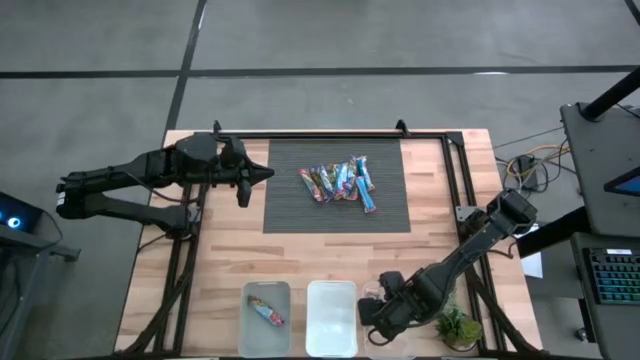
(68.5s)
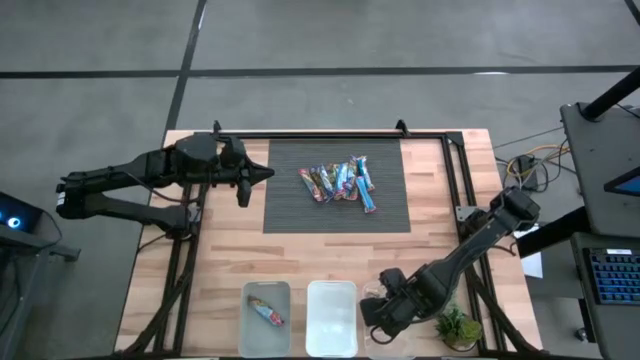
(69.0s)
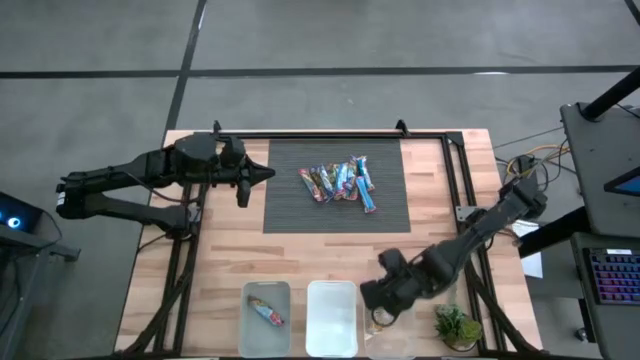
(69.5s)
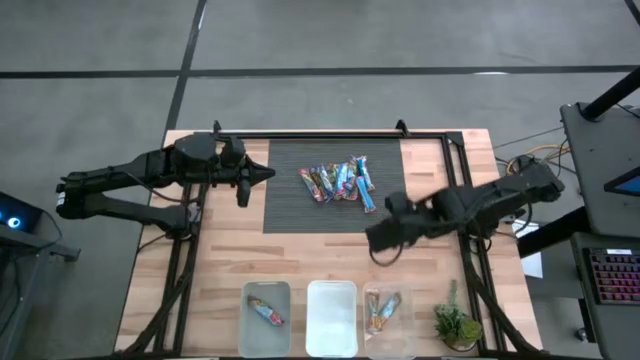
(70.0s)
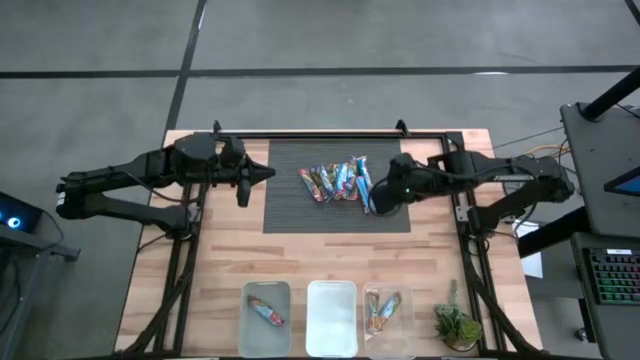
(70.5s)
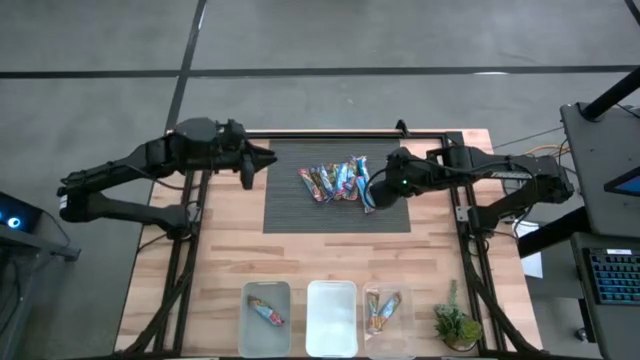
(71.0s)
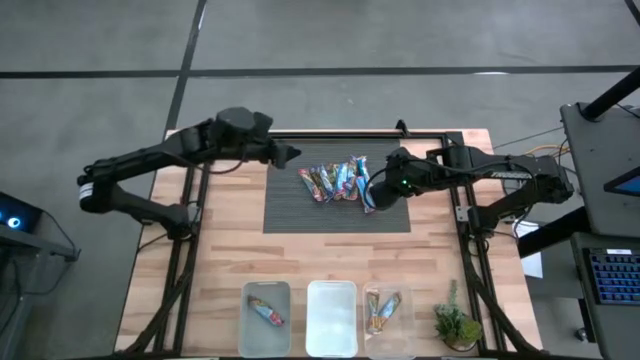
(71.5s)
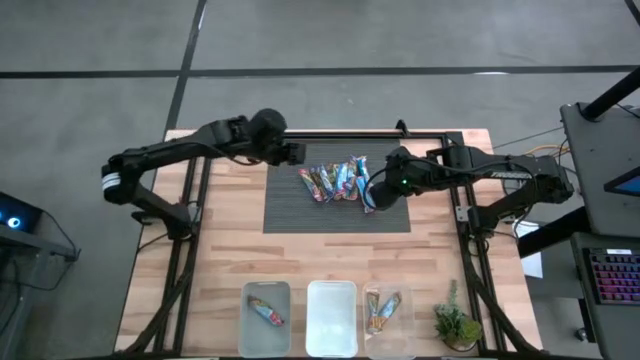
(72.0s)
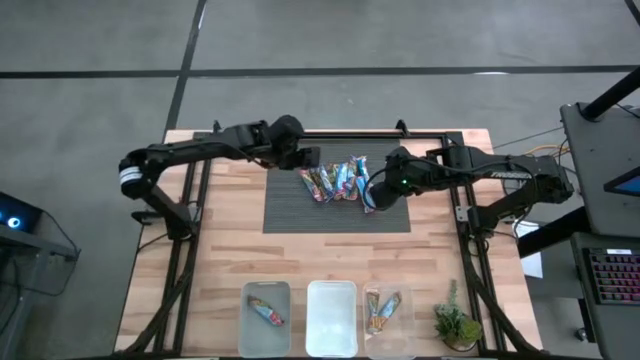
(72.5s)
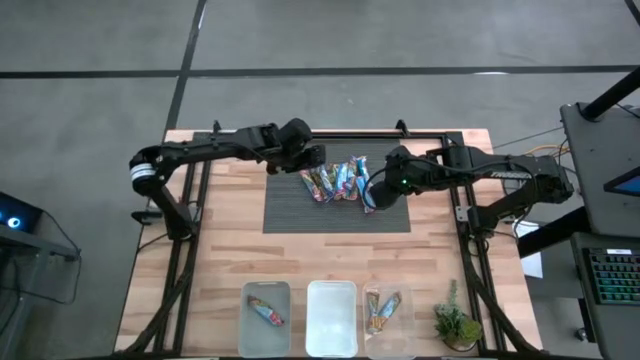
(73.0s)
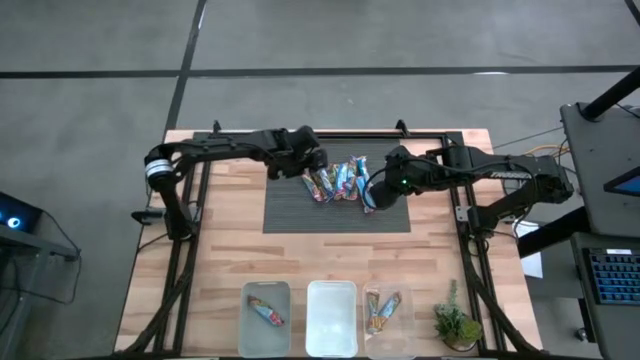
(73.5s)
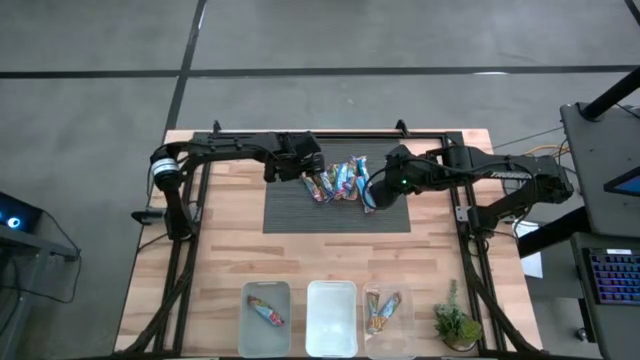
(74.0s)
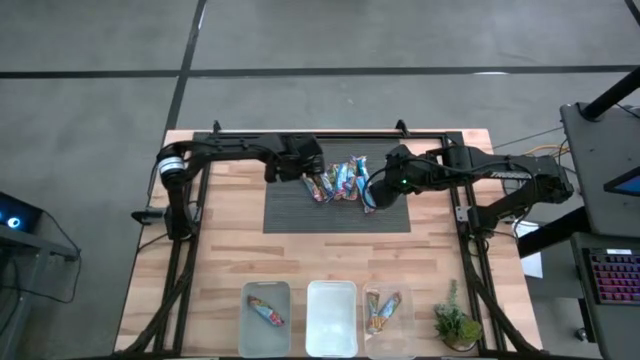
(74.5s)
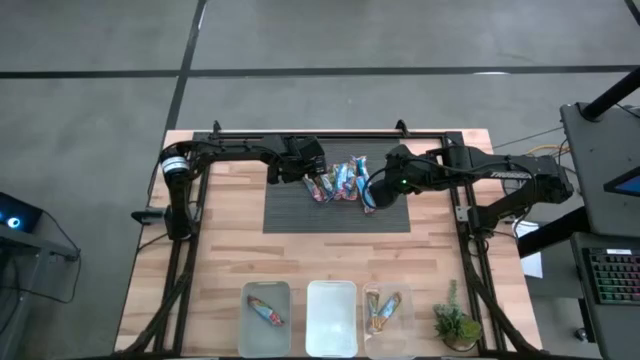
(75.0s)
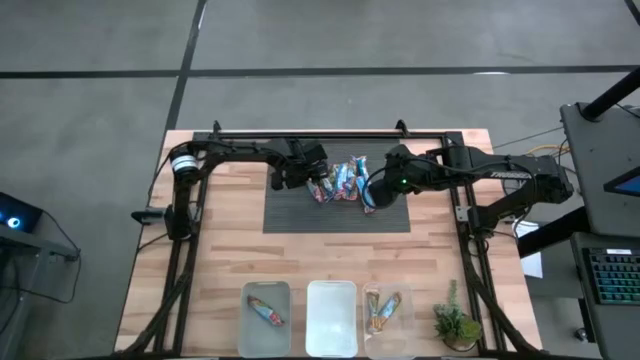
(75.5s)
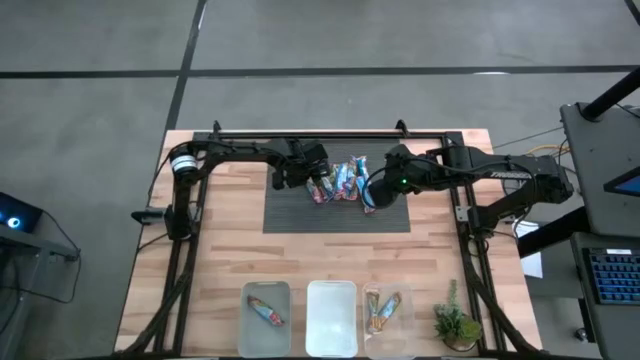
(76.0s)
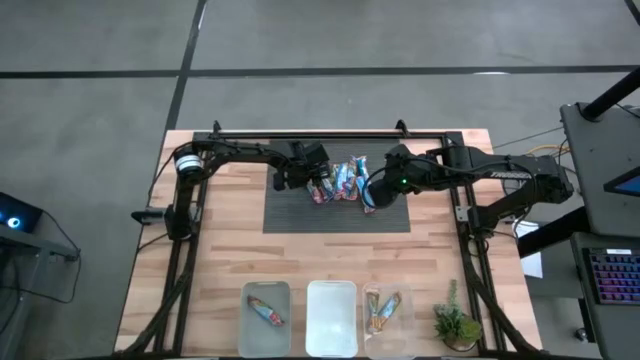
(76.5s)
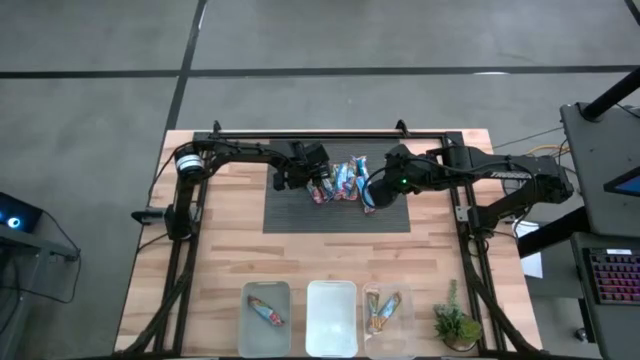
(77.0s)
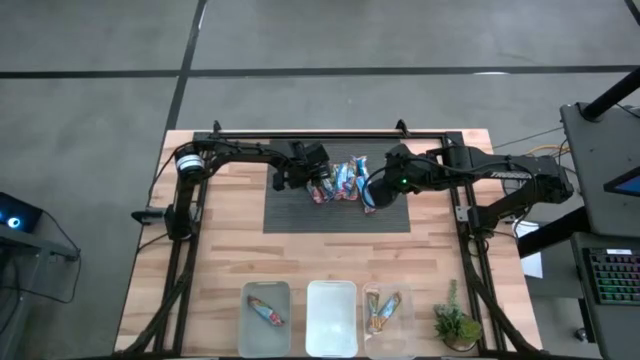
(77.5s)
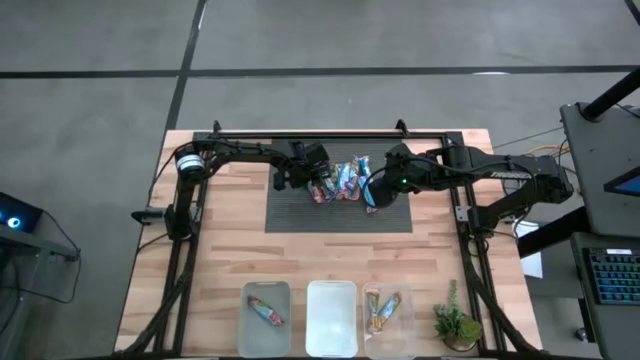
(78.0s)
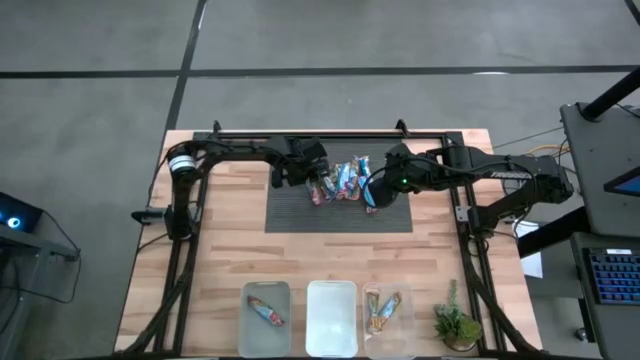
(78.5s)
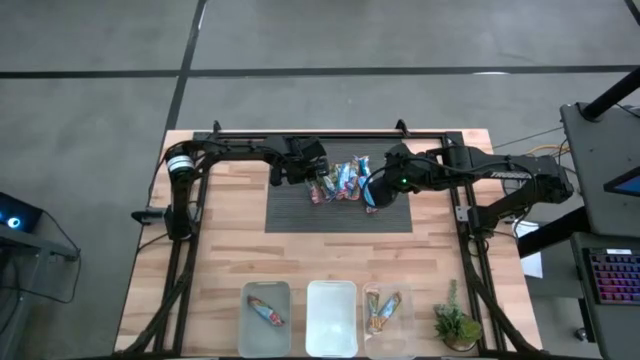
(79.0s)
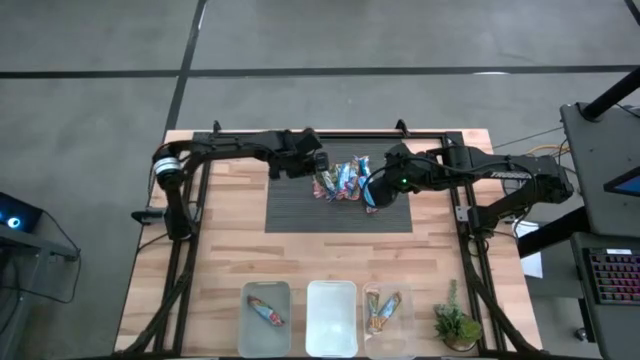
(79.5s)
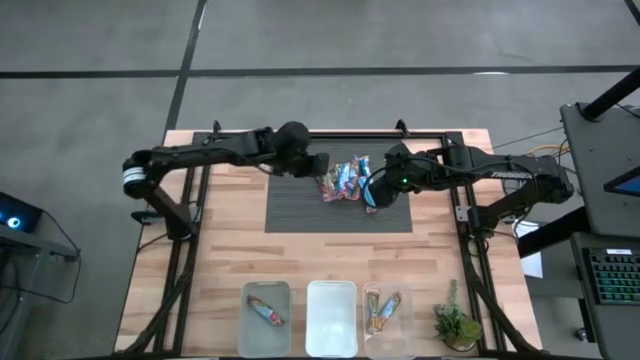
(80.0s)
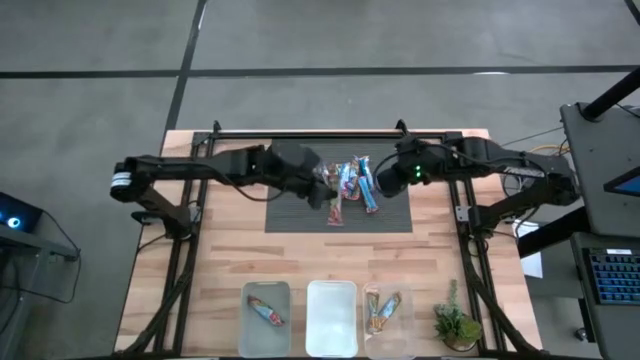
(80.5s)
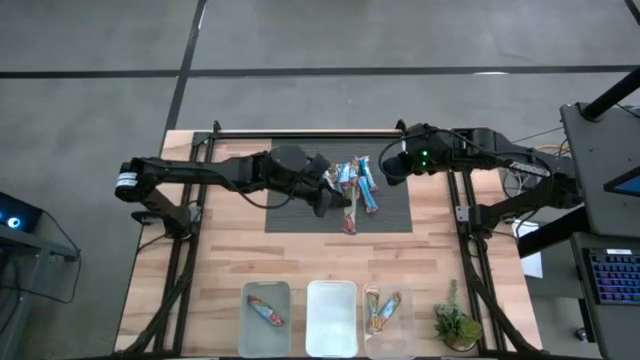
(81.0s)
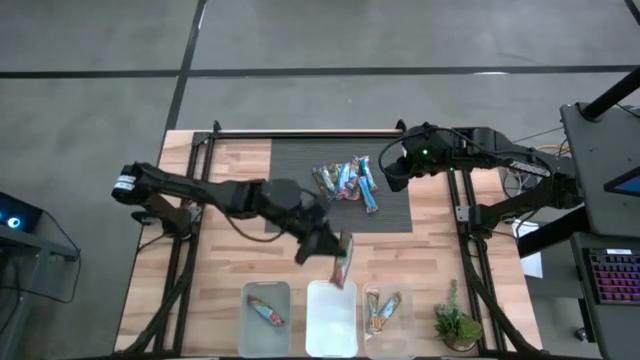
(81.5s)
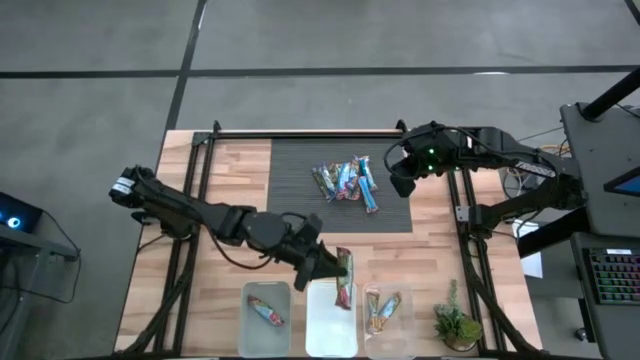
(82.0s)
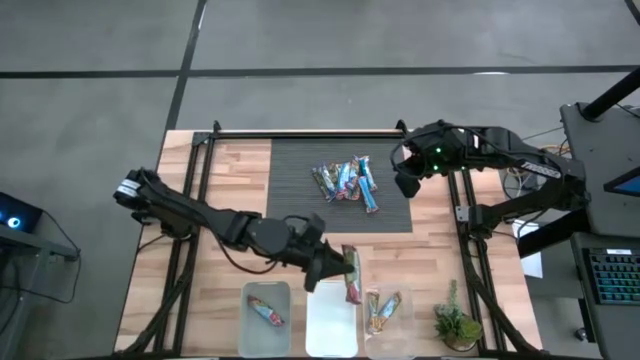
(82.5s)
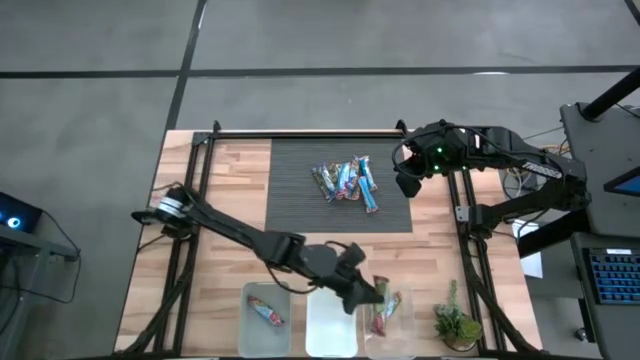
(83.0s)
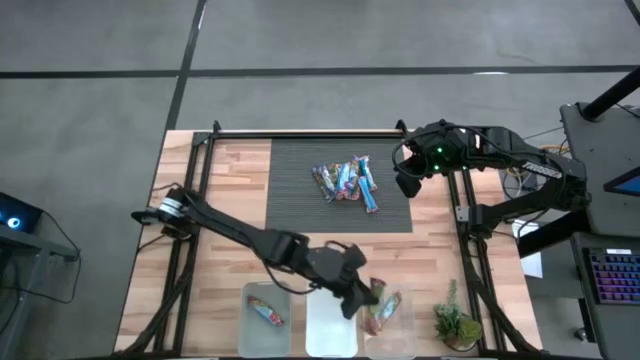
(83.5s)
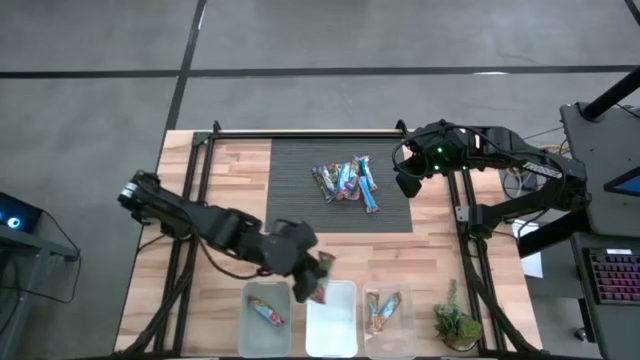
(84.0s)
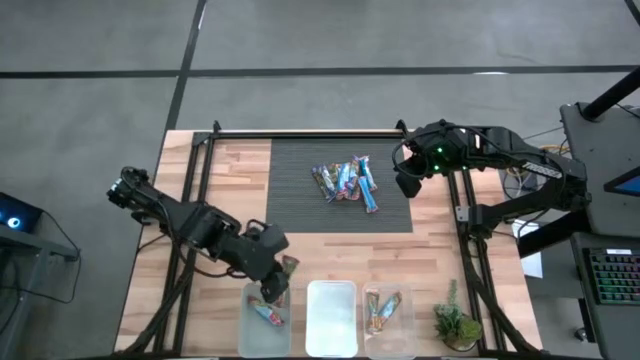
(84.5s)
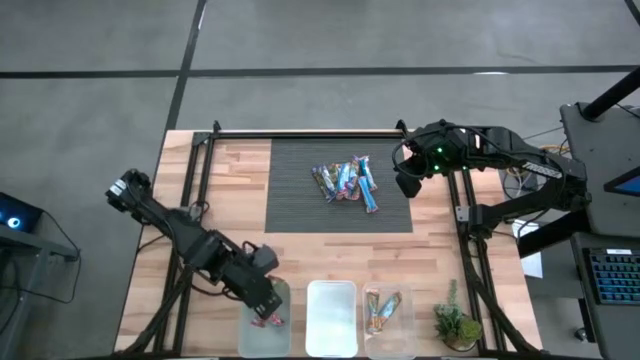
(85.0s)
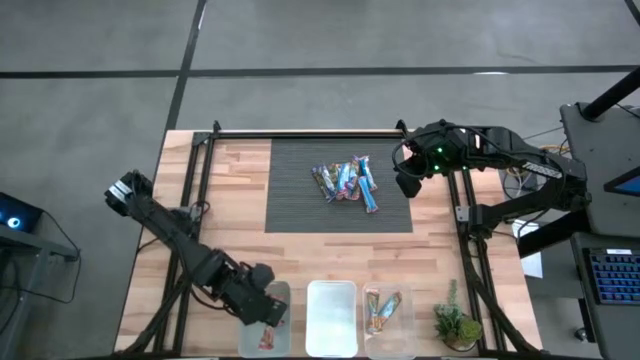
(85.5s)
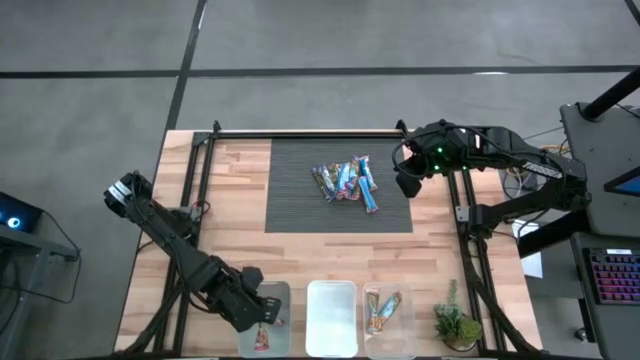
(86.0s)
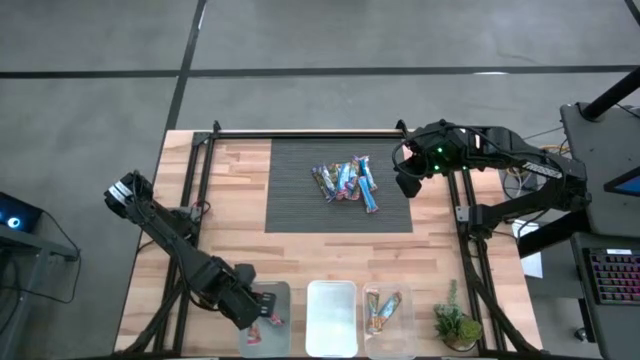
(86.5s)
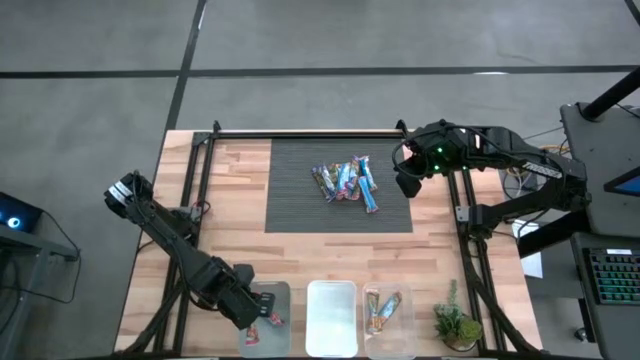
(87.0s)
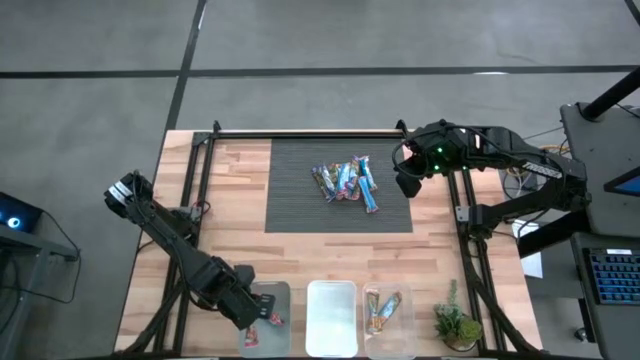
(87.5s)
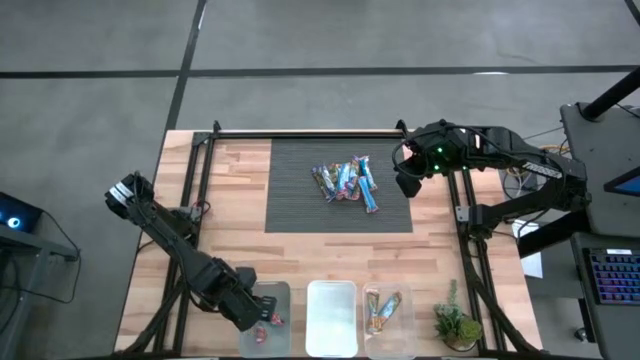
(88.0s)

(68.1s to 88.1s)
Task: Pick and place Granola Bars by type
Put the red granola bar into the gray bin

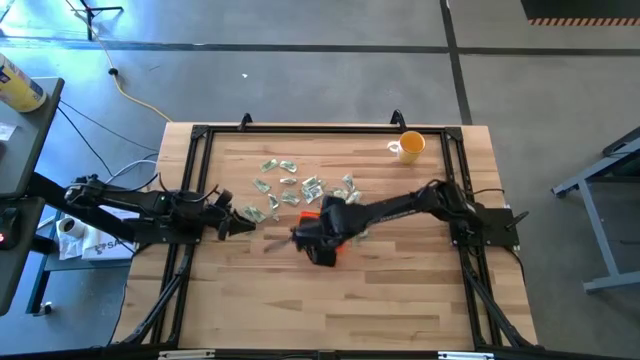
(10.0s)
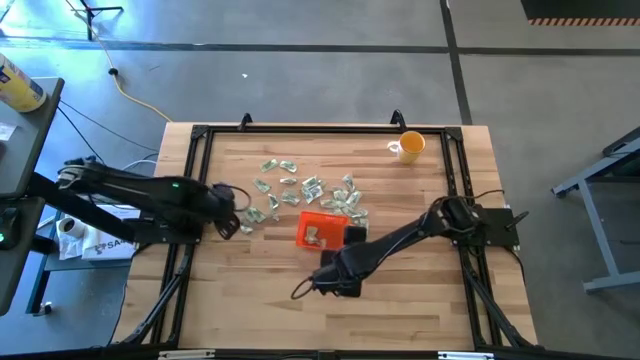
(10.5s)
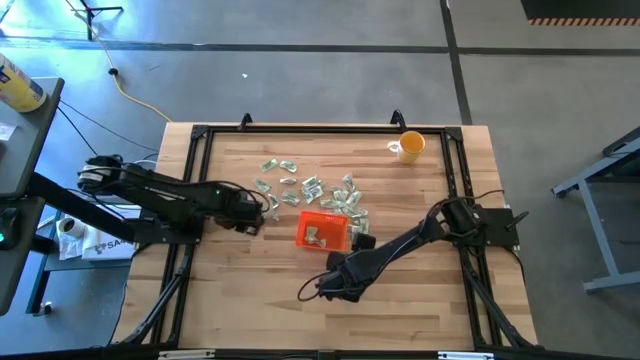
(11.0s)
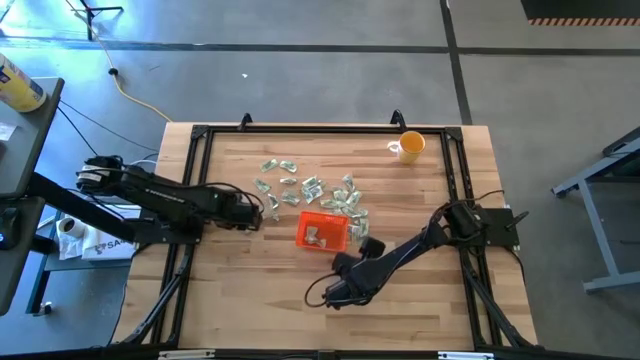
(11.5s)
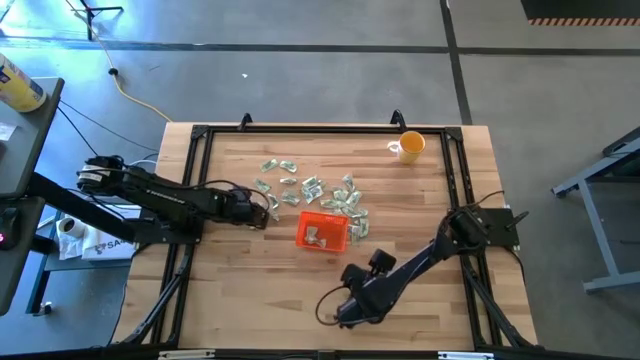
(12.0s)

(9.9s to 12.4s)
Task: Pick and place Stevia / Truvia into bins
Put the stevia packet into the orange bin

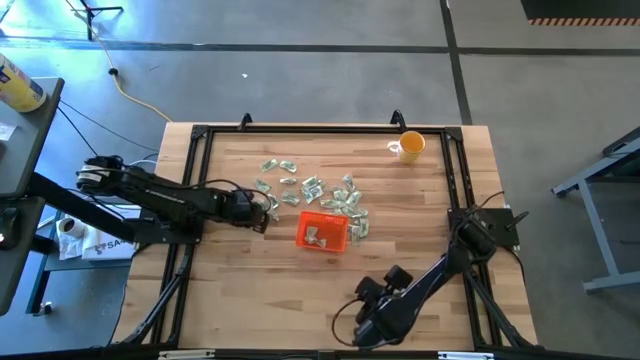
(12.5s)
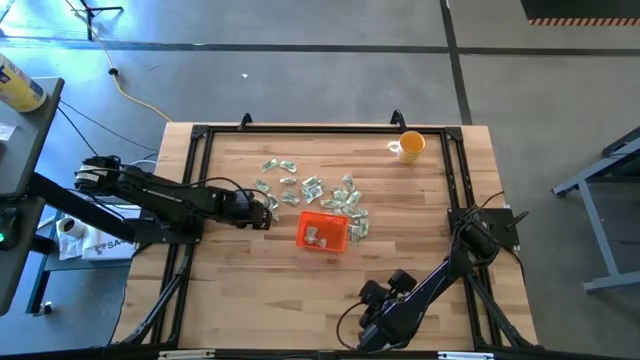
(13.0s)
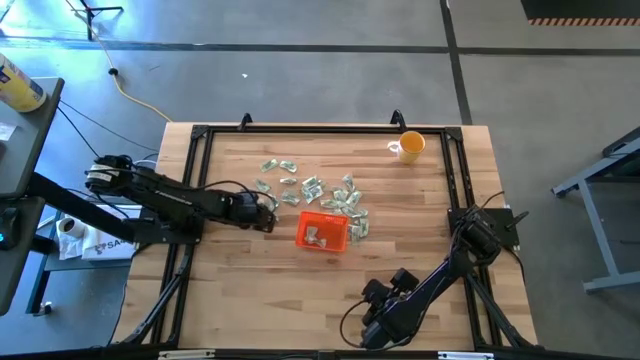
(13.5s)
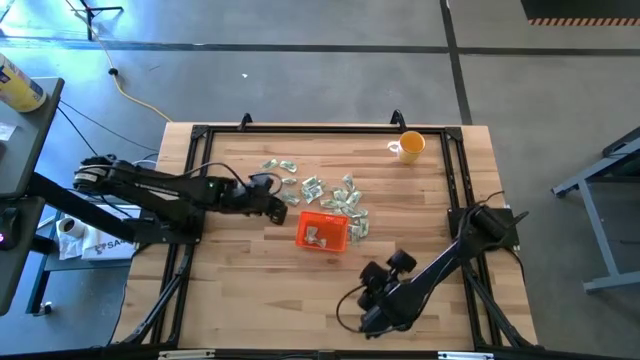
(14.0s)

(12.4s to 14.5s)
Put the stevia packet into the orange bin
